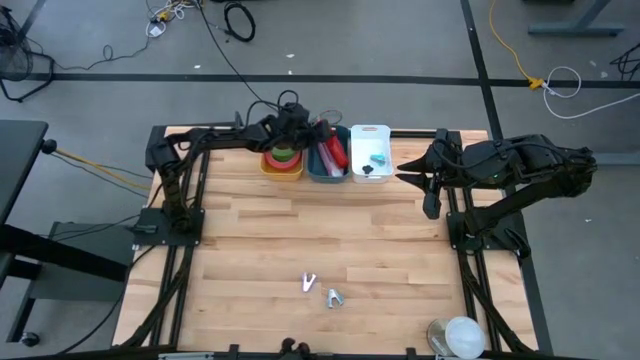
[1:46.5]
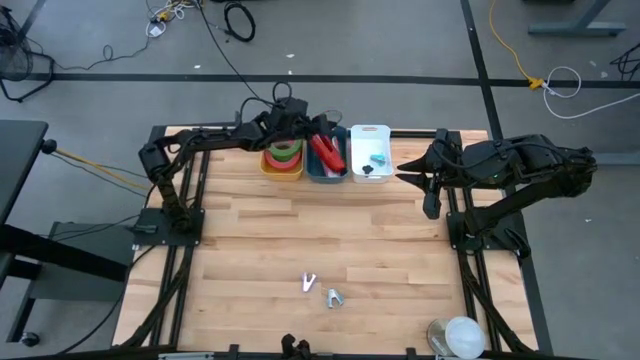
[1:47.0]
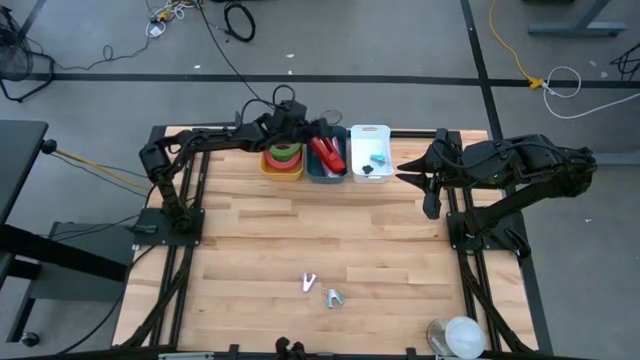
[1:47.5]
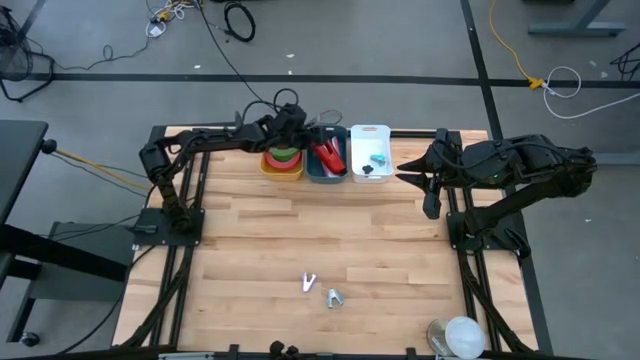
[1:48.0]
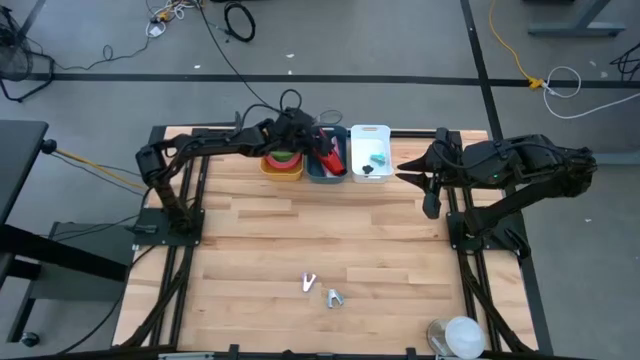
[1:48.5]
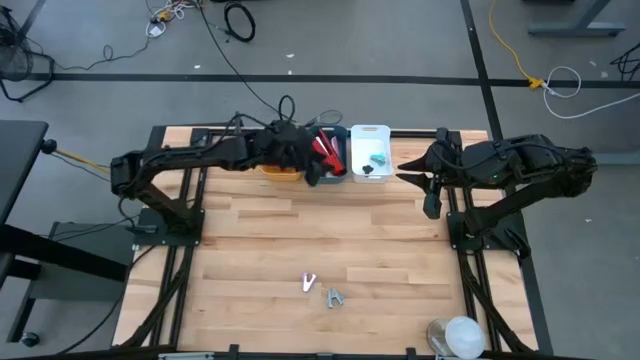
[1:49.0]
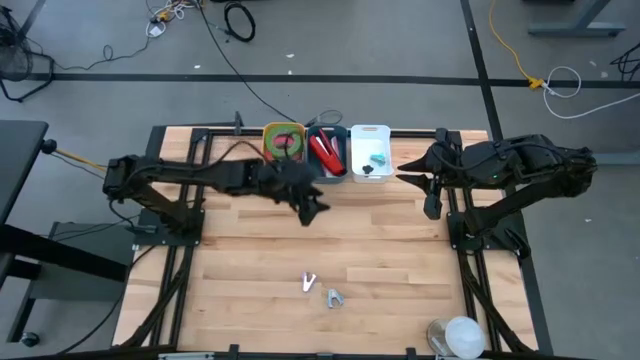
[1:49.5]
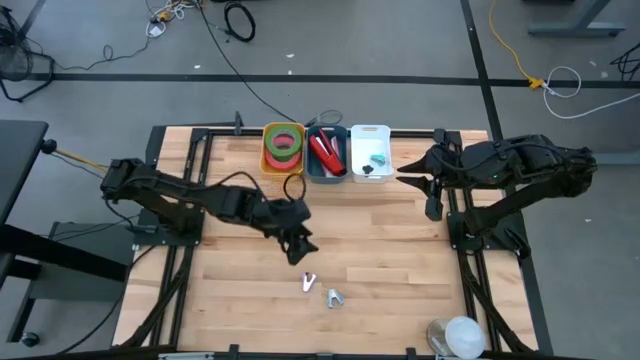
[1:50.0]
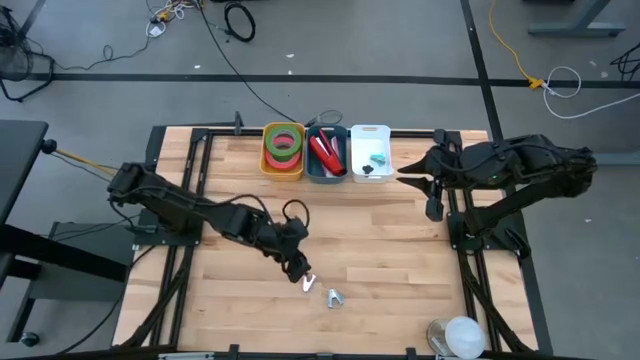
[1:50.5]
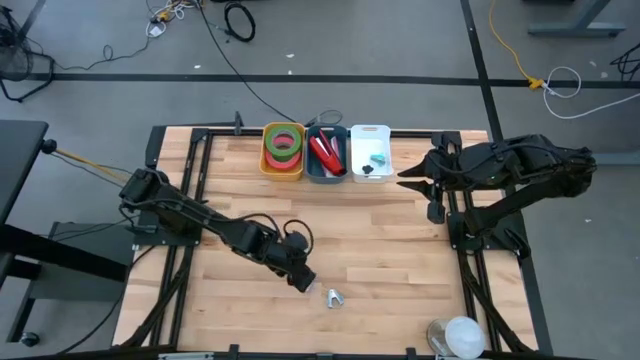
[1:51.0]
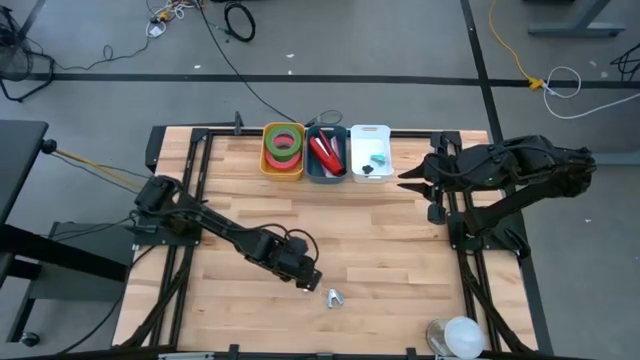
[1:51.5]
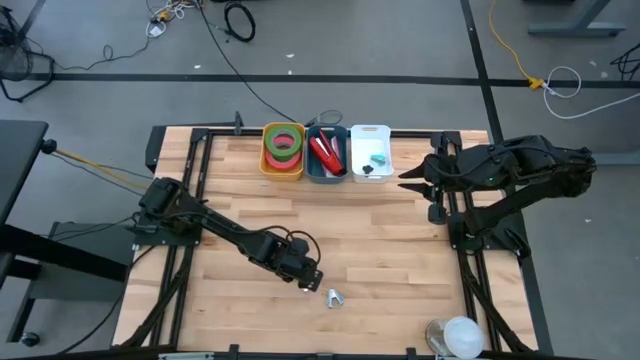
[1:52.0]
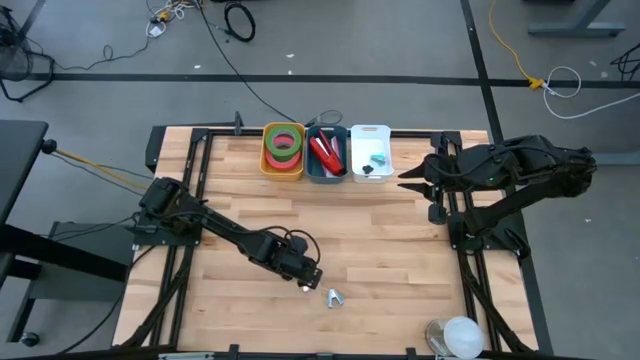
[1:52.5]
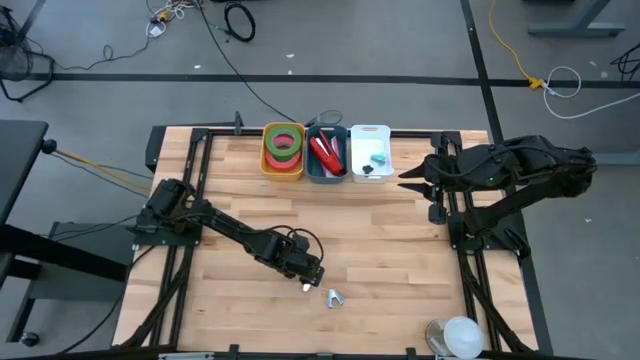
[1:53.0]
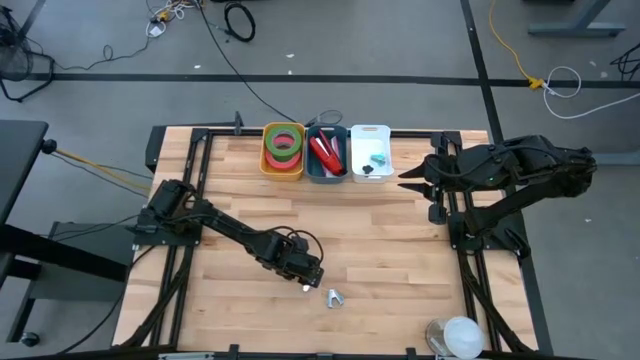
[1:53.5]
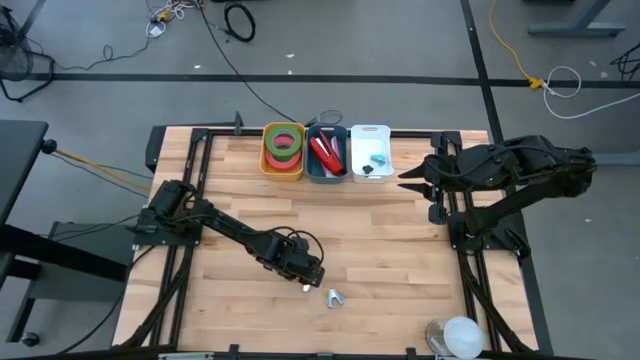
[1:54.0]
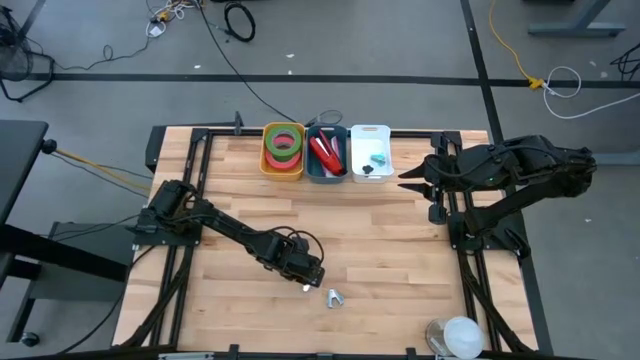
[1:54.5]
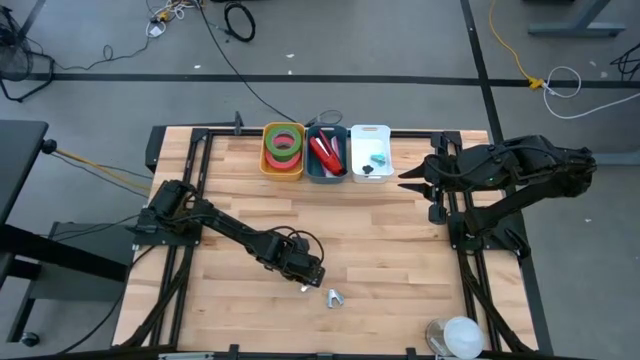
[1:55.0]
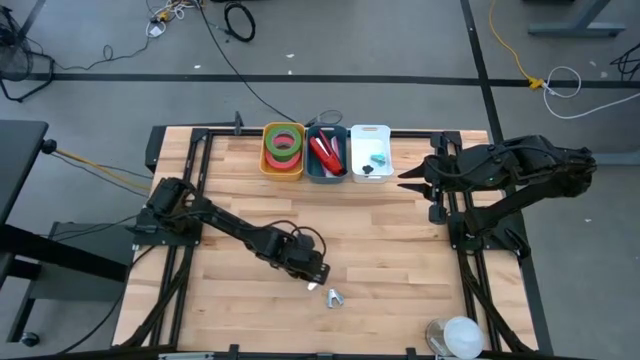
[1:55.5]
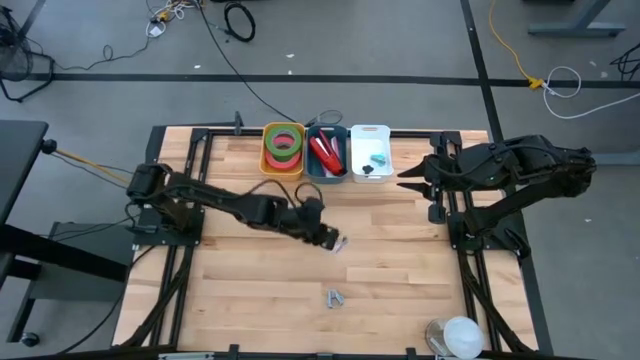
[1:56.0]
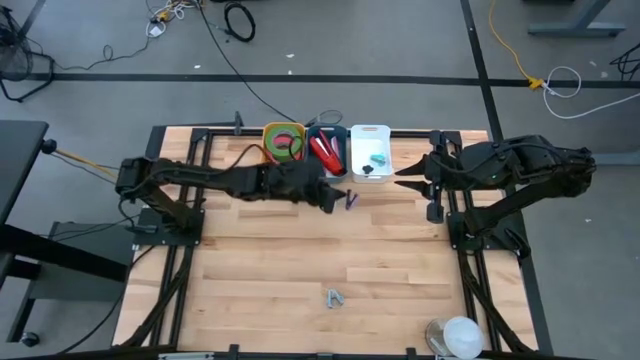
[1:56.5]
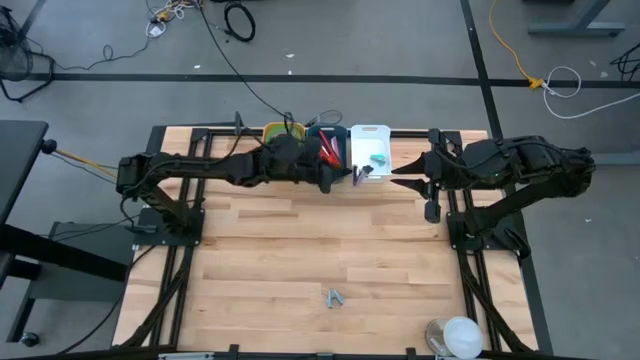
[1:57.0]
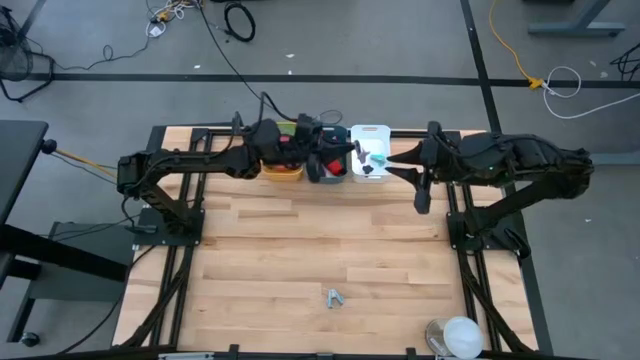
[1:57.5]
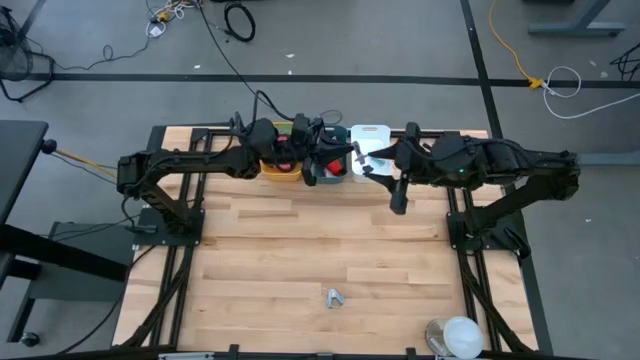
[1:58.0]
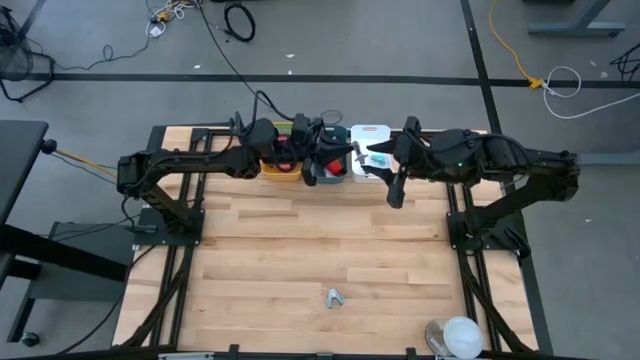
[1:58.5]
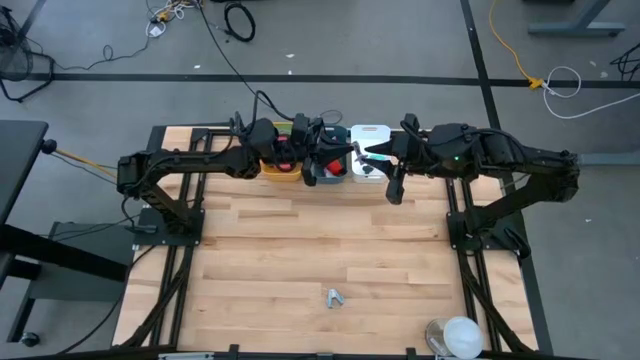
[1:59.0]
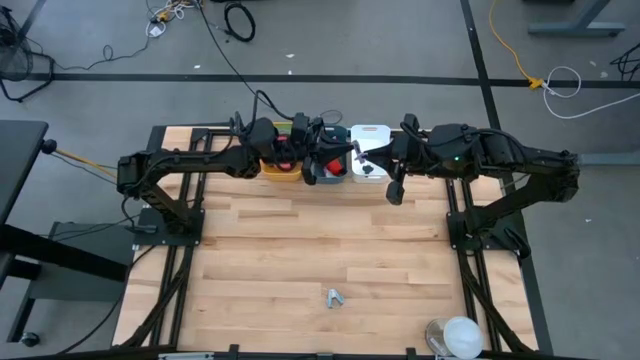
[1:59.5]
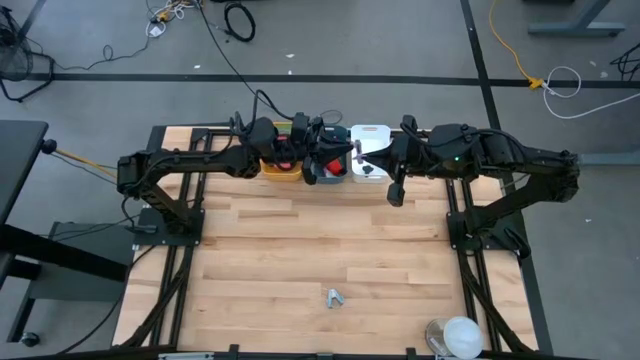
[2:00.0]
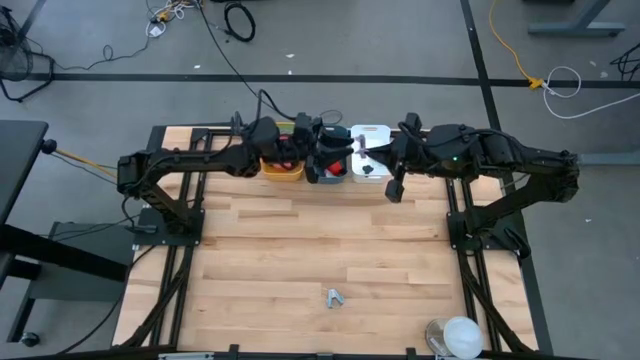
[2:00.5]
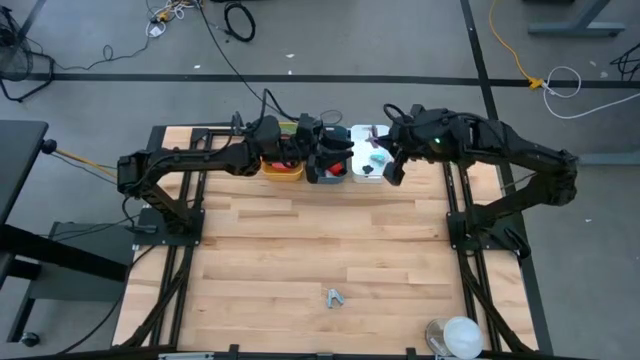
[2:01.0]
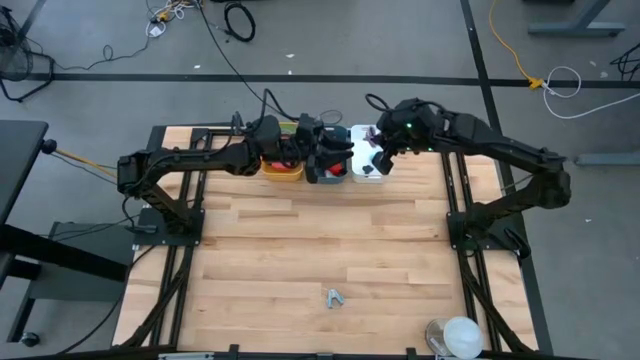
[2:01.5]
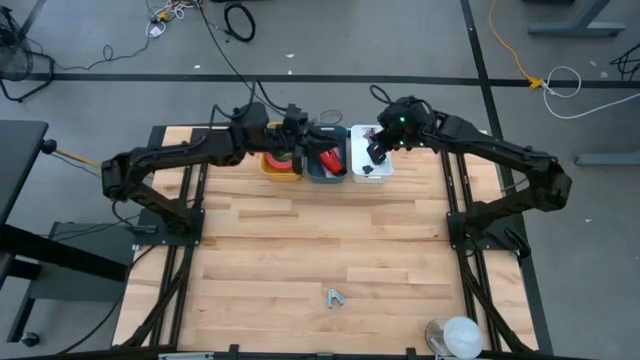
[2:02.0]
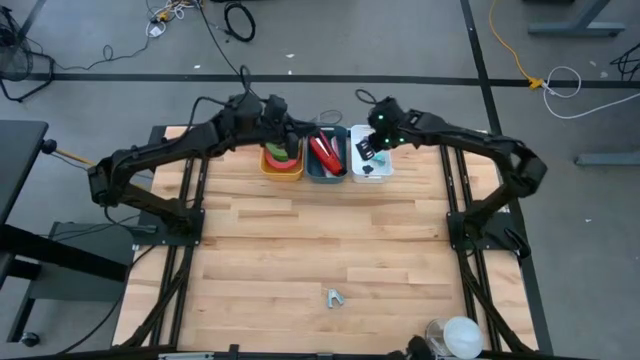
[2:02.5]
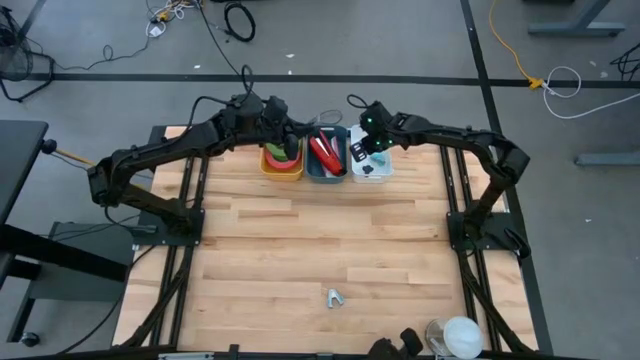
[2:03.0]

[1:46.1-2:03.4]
Task: Pick and place Stapler, Stapler remover, tape
Put the purple staple remover into the white bin

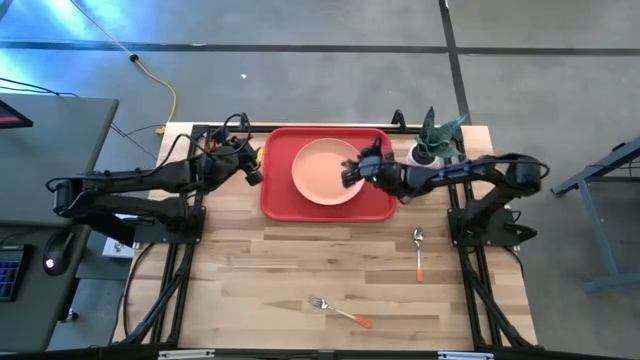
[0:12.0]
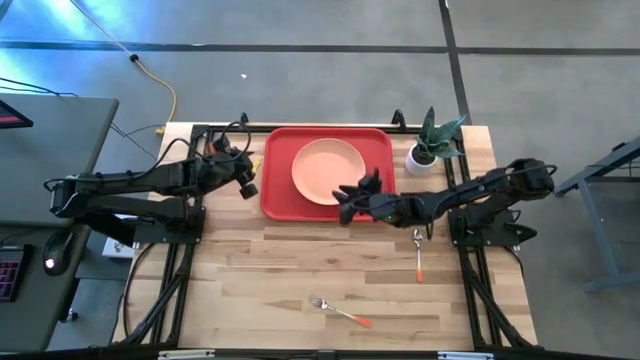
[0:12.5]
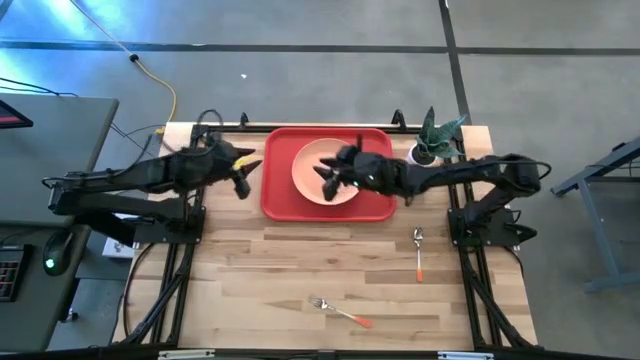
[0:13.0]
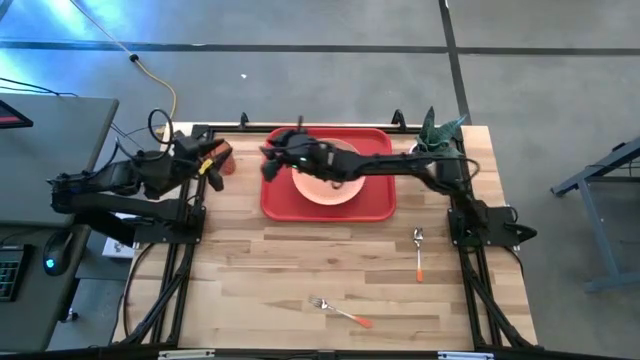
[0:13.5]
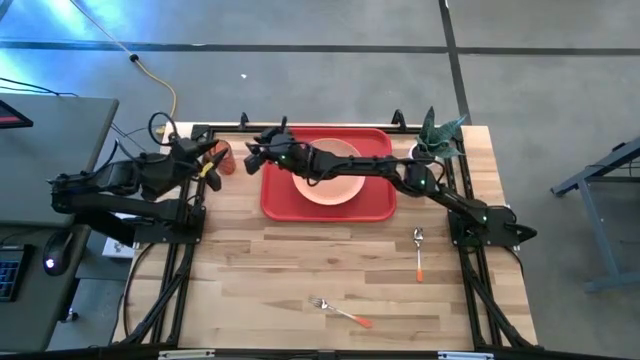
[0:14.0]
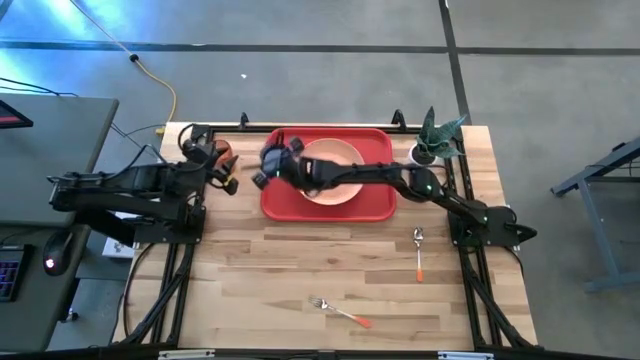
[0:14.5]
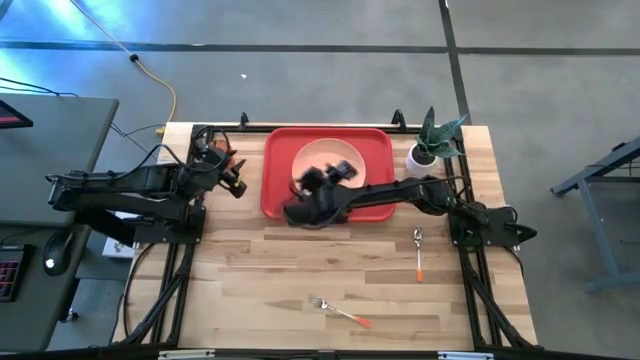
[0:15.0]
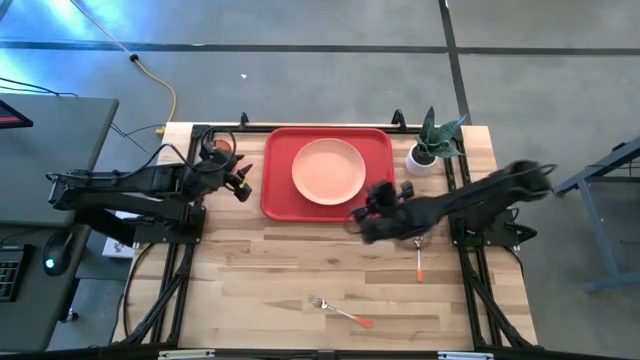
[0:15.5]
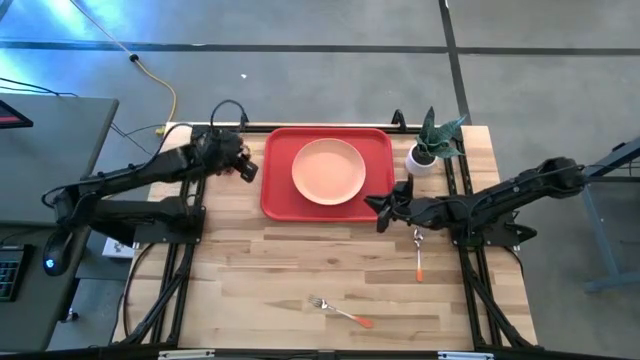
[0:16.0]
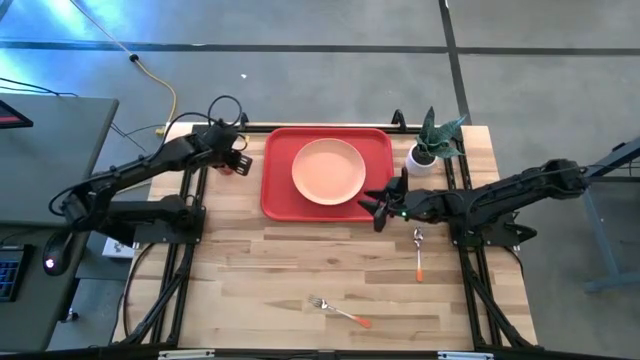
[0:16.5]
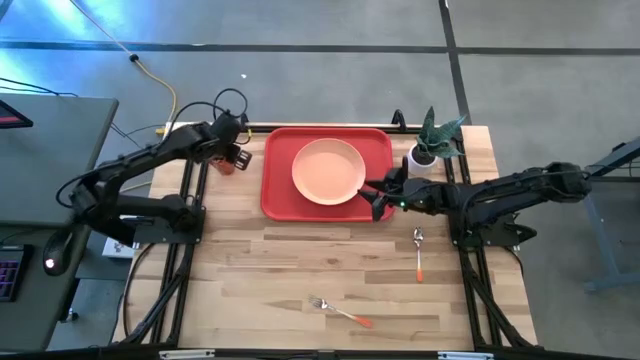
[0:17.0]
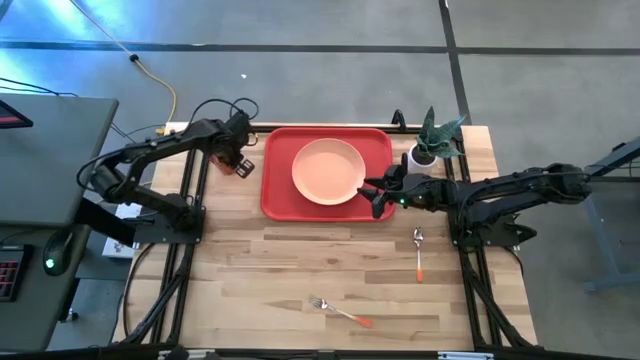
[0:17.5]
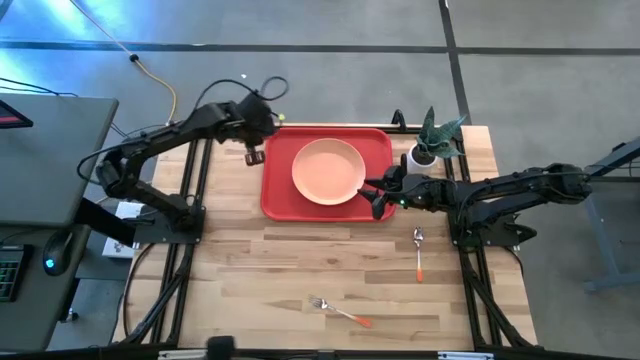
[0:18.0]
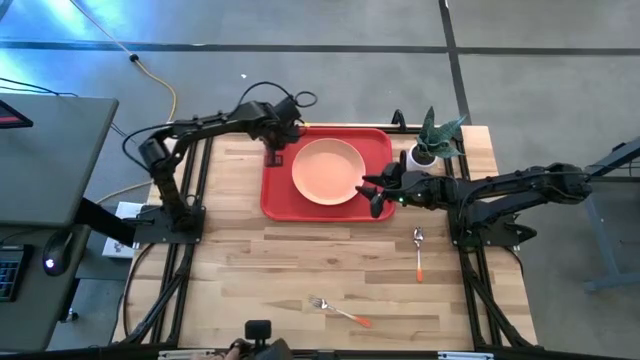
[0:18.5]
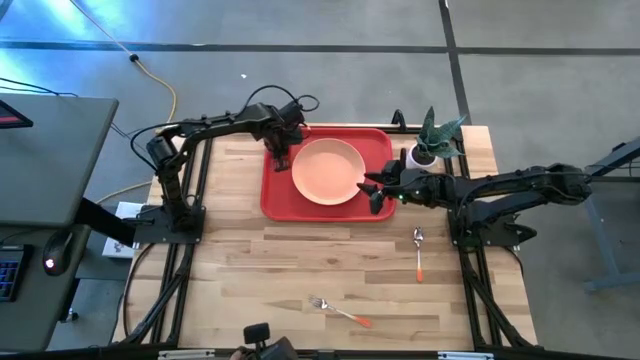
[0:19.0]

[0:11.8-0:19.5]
Task: Pick and place plate/cup/fork/spoon on tray
Put the orange cup to the left on the red tray
